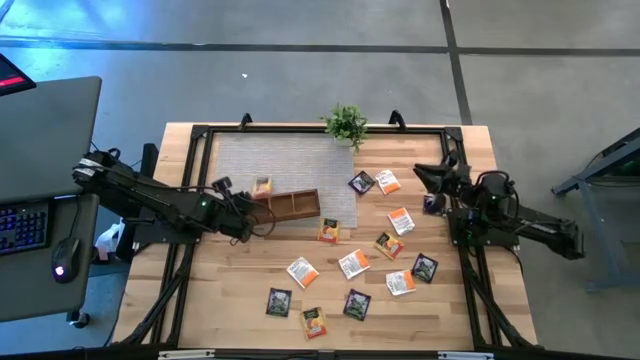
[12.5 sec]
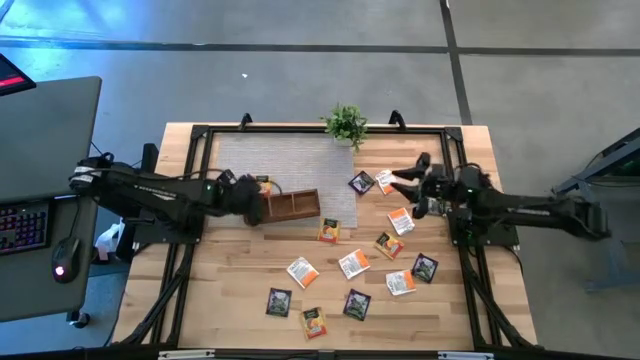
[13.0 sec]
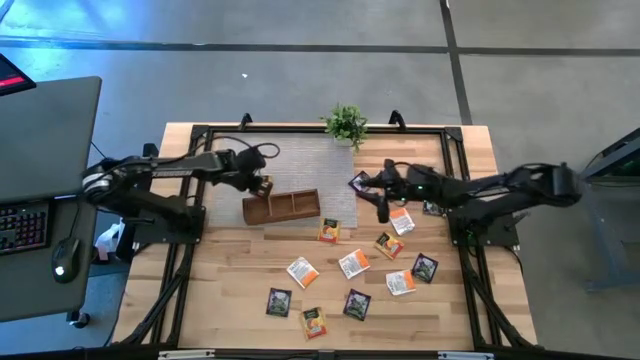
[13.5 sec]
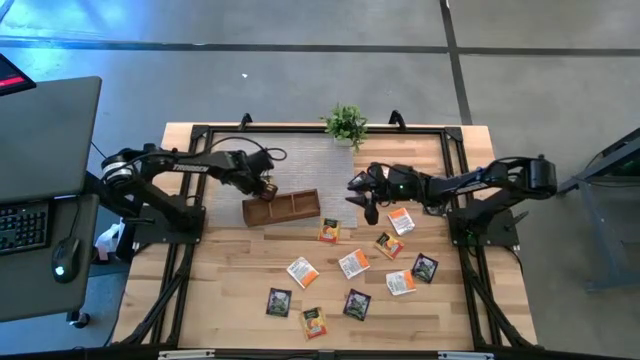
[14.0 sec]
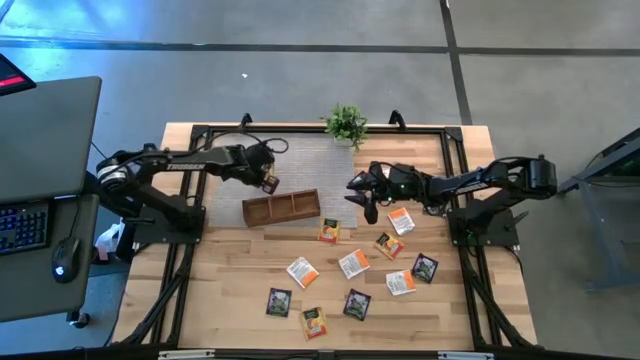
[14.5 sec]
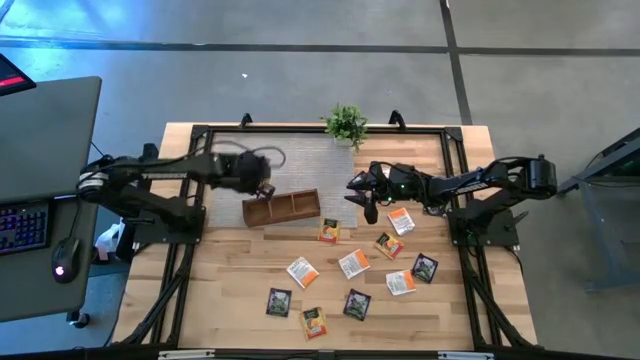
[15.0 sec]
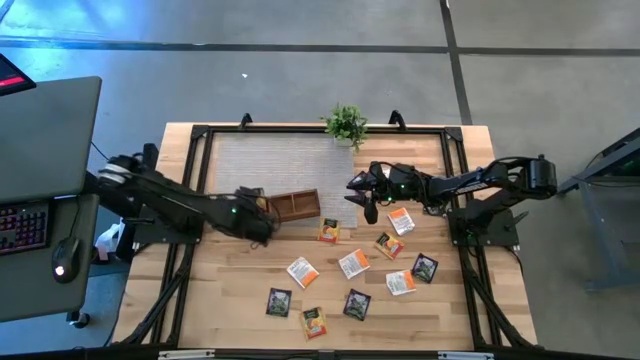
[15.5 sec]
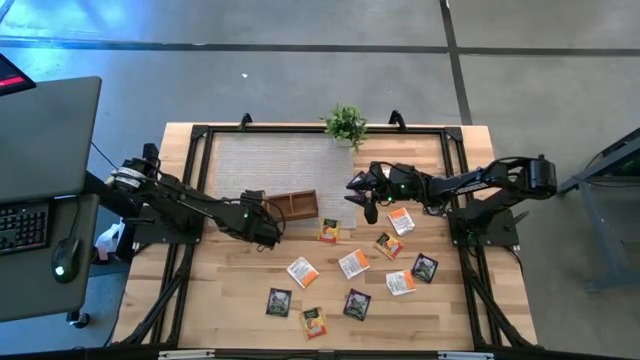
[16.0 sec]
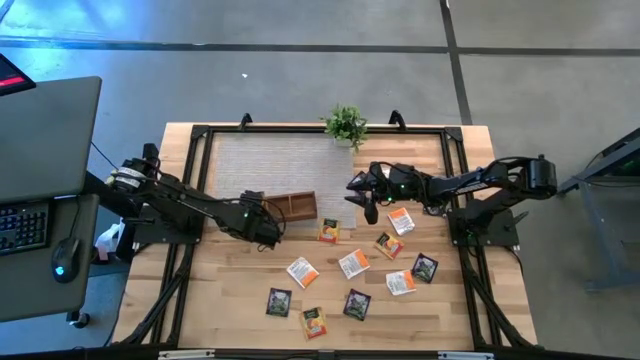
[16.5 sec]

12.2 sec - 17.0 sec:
Task: Pick & Place Tea
Put the yellow tea bag into the left section of the wooden organizer

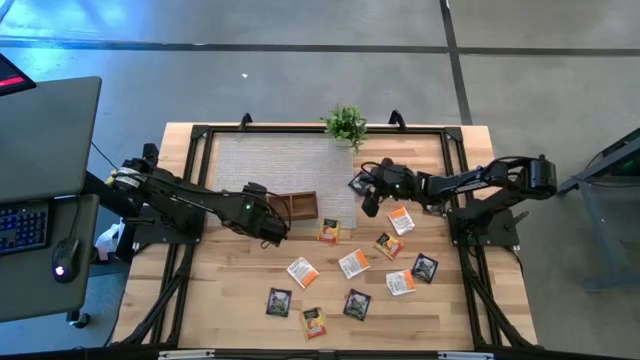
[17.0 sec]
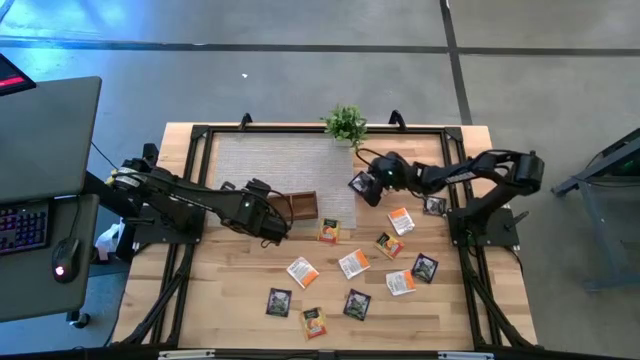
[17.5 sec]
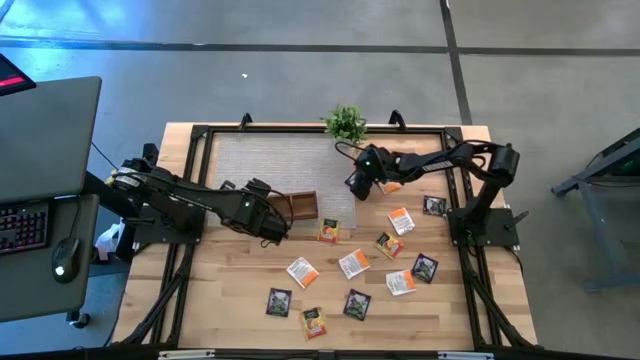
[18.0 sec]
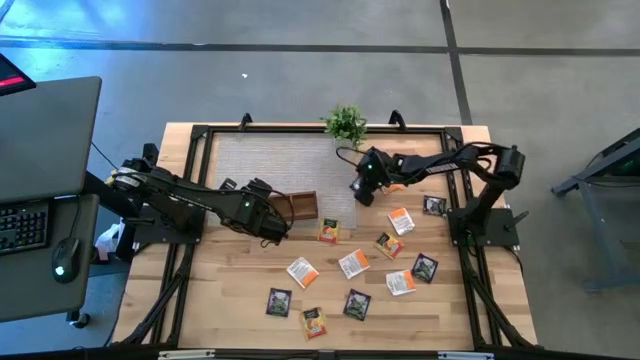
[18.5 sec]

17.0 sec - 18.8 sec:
Put the purple tea bag into the middle section of the wooden organizer

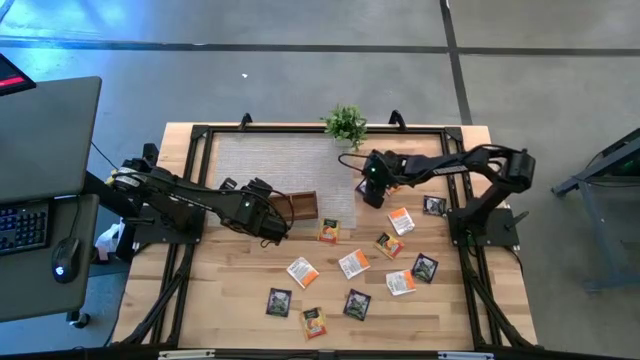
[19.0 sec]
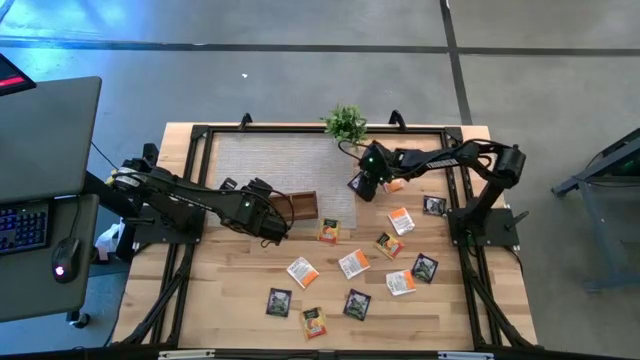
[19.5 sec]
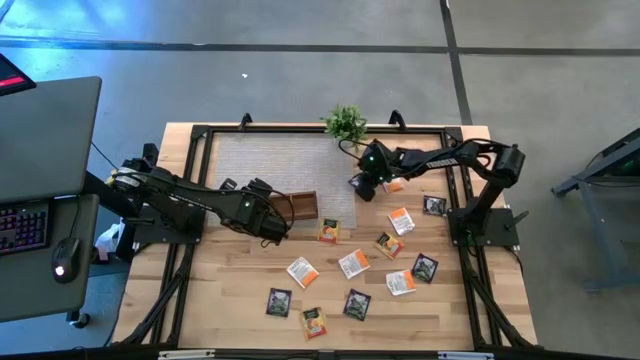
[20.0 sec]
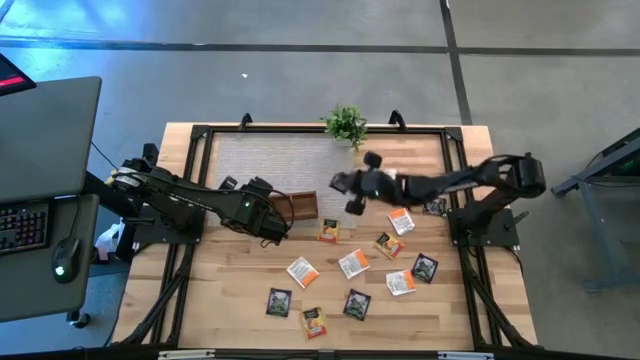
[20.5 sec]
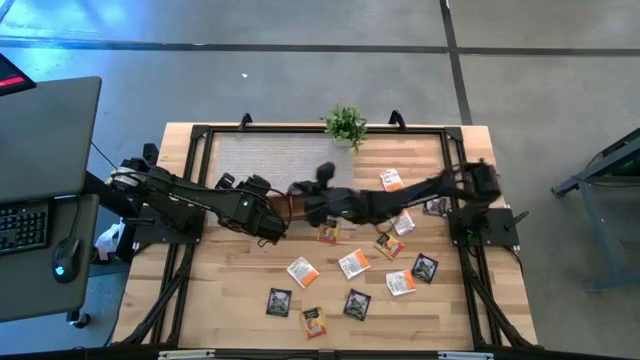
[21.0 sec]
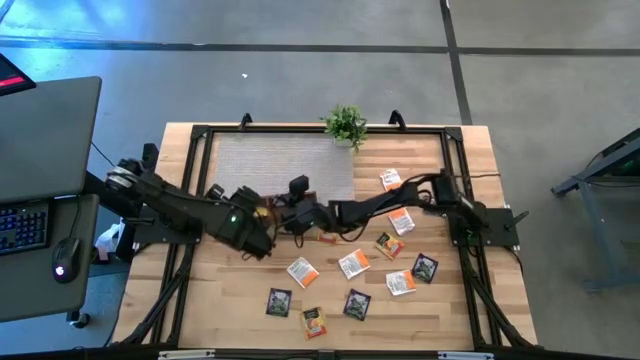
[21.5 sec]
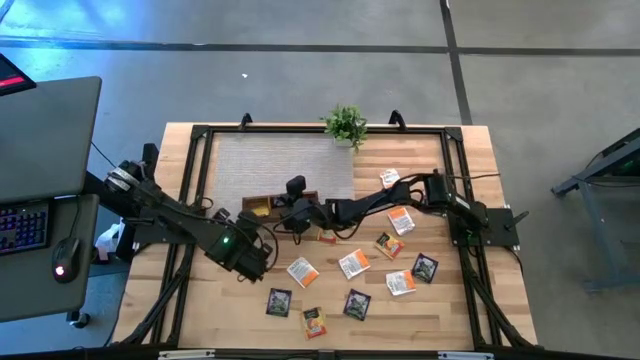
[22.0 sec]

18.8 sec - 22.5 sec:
Put the purple tea bag into the middle section of the wooden organizer

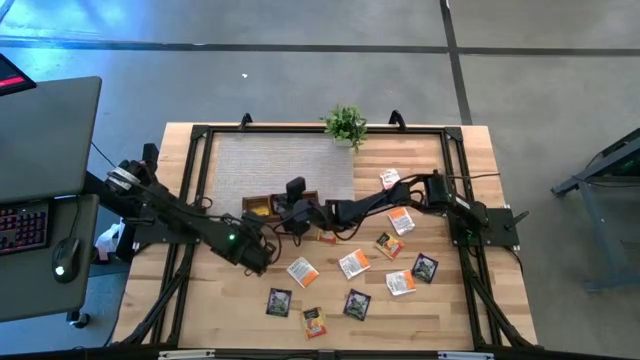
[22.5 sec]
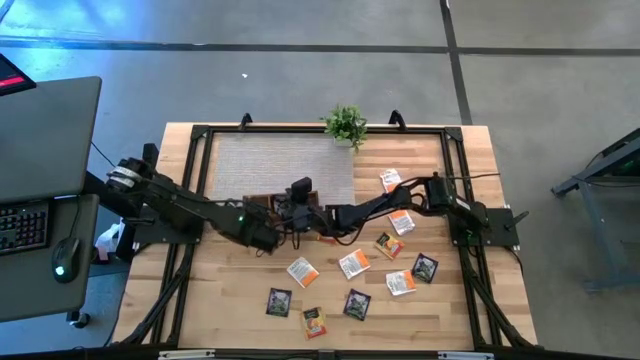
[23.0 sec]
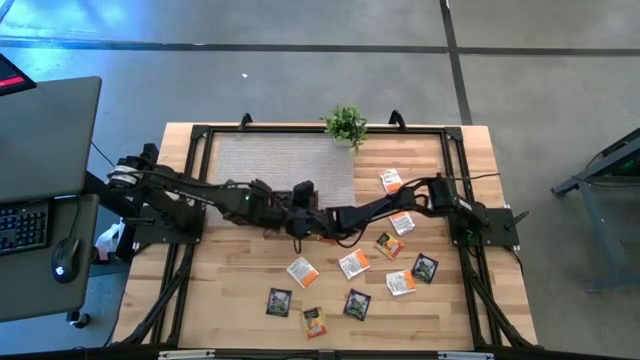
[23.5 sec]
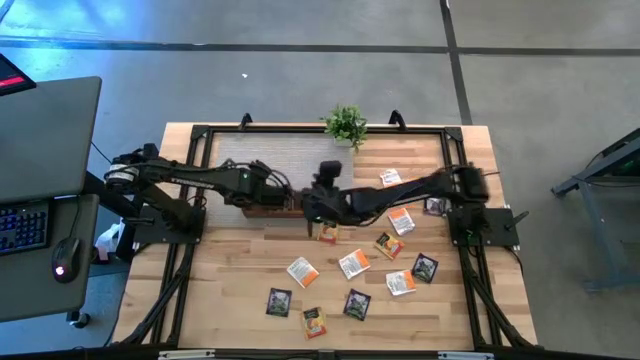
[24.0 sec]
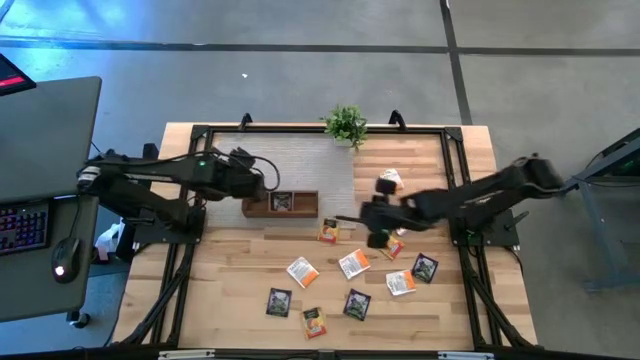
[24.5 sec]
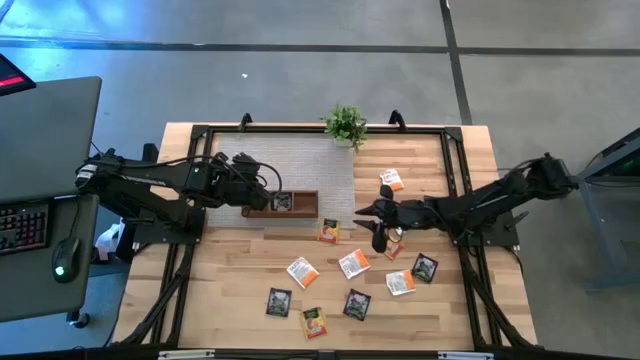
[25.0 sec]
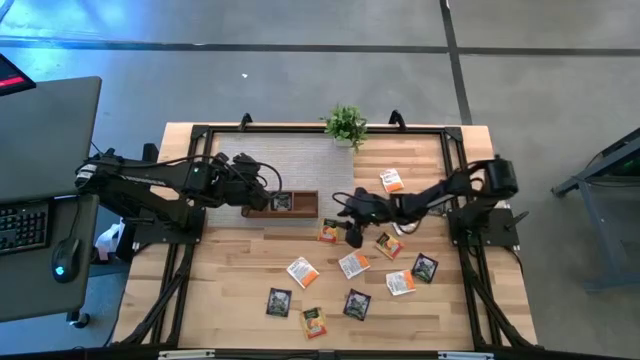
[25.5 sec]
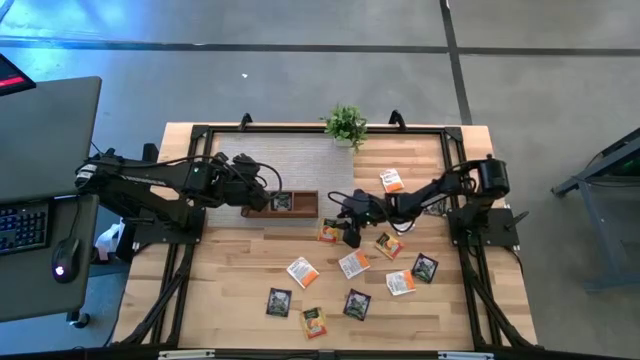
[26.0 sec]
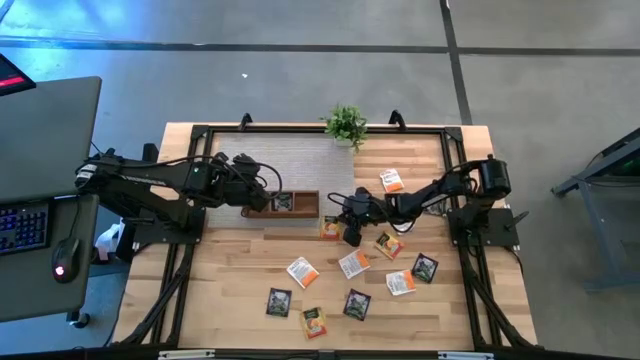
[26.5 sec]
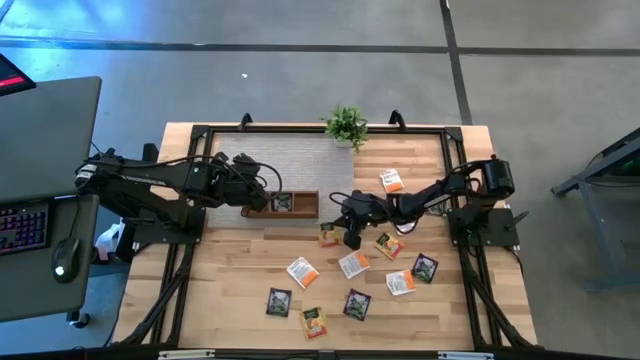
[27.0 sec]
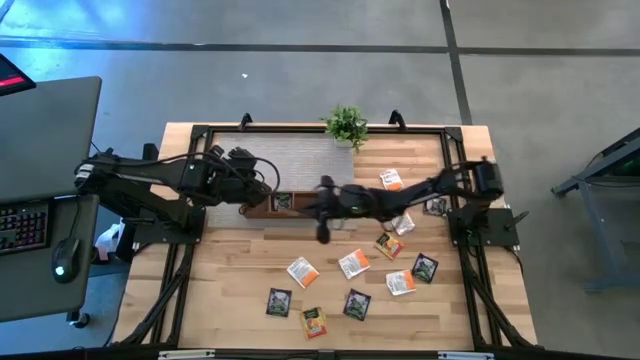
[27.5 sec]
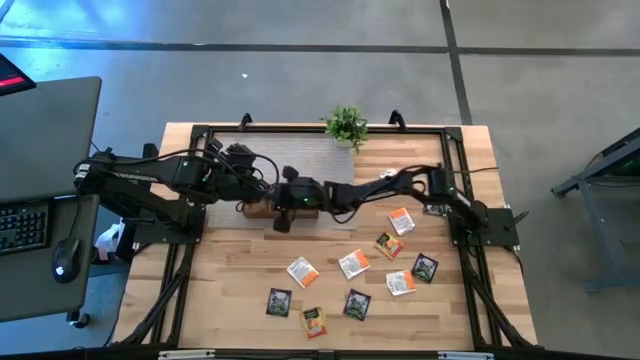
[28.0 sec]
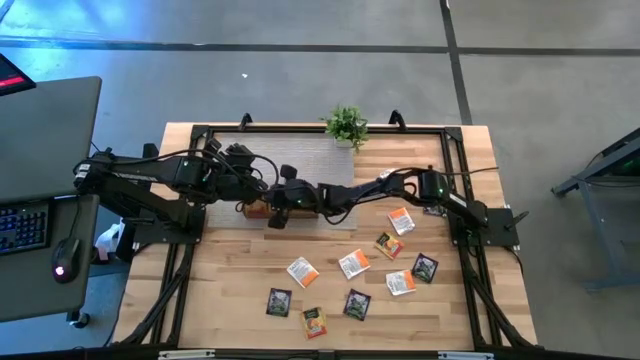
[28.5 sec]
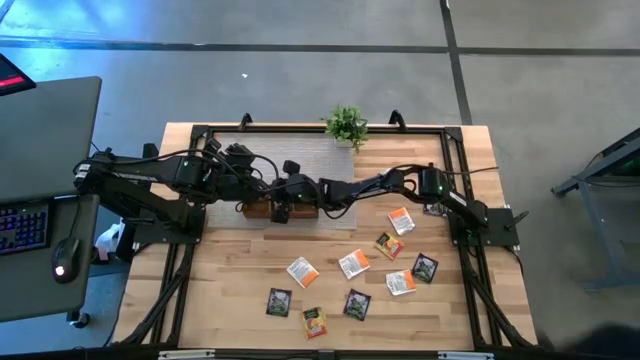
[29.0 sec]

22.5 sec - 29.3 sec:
Put the yellow tea bag into the left section of the wooden organizer

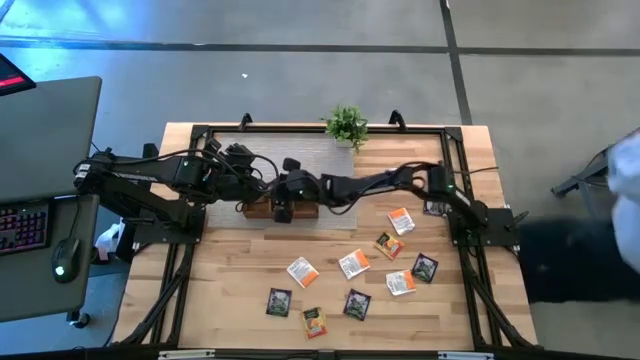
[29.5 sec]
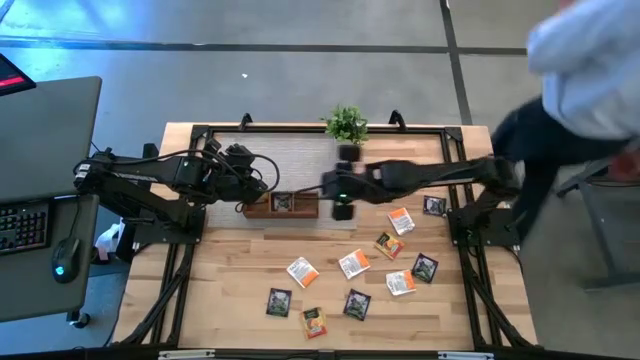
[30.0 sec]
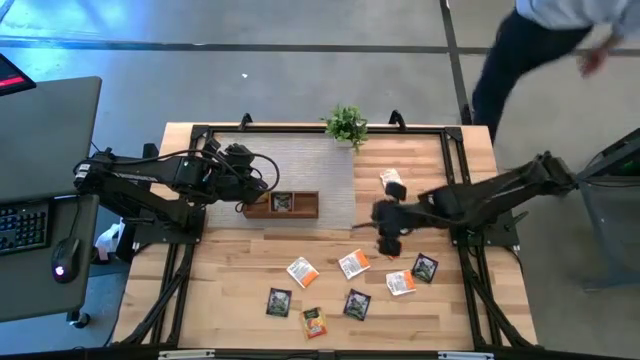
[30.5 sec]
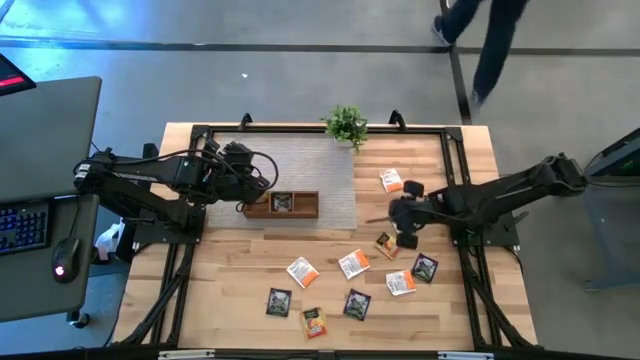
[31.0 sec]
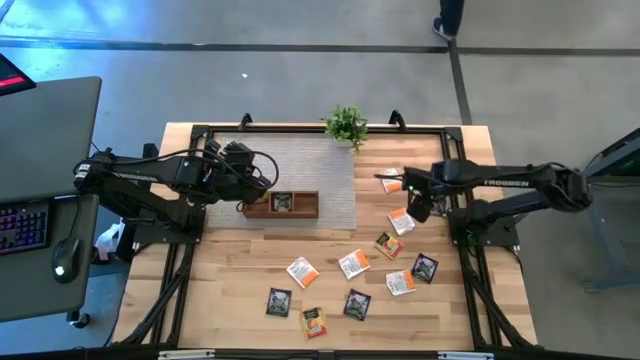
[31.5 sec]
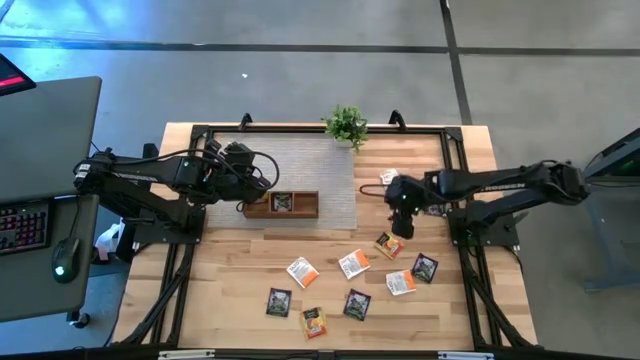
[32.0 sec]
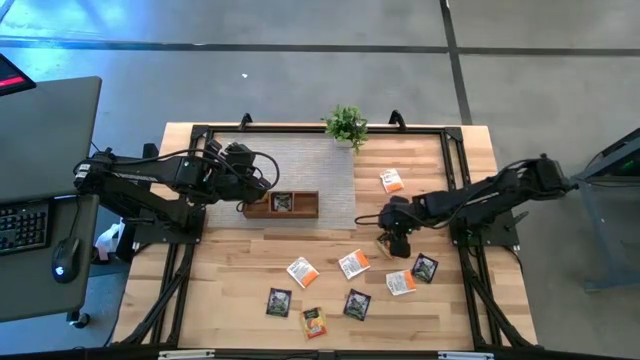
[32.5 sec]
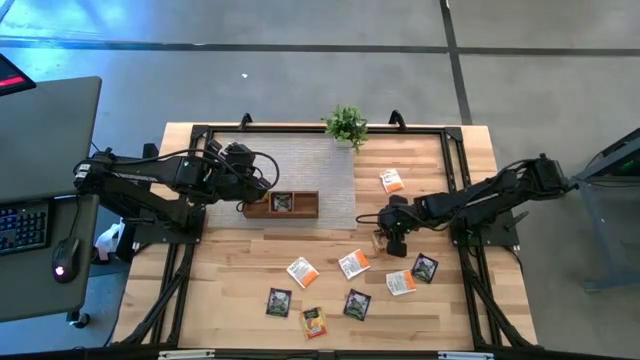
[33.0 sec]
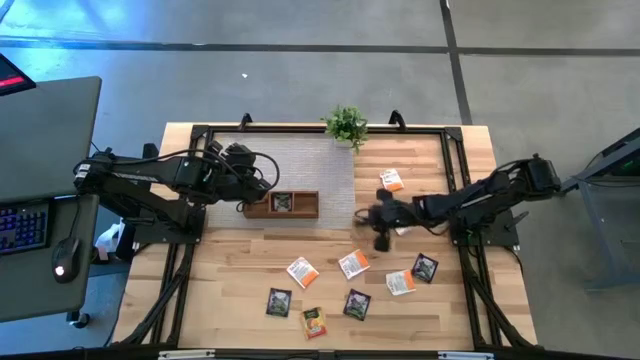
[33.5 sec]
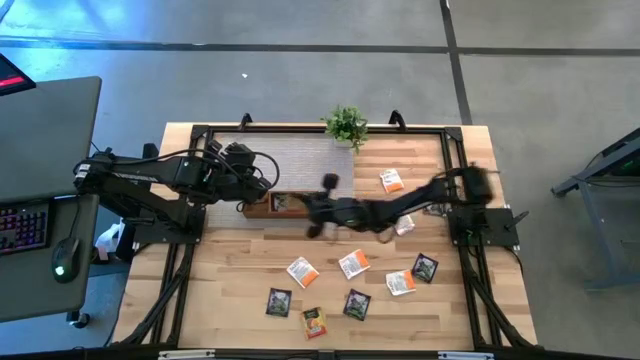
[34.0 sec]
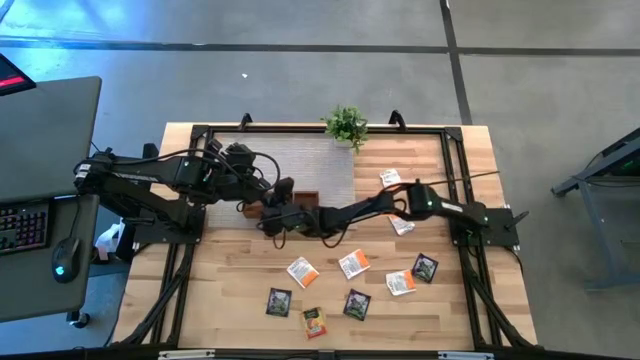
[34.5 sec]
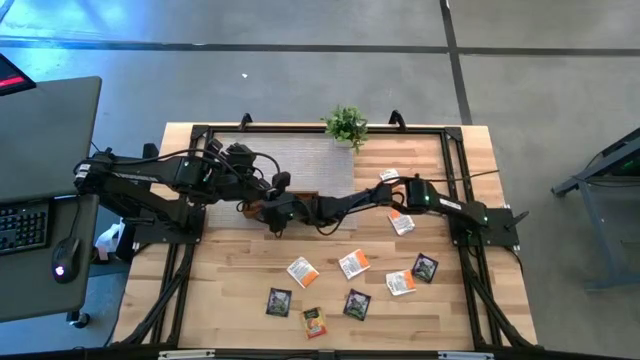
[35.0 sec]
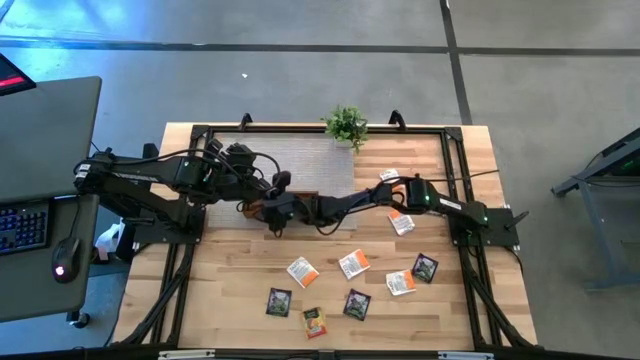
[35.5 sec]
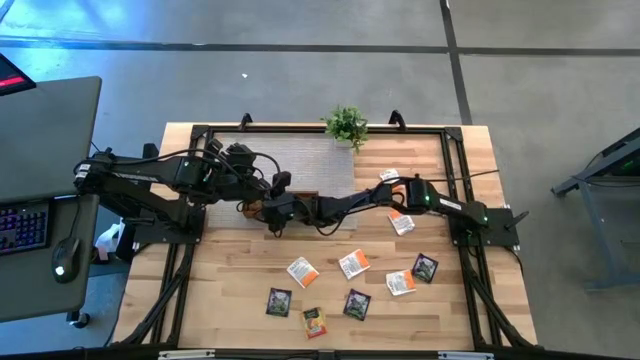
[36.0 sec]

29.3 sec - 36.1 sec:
Put the yellow tea bag into the left section of the wooden organizer
